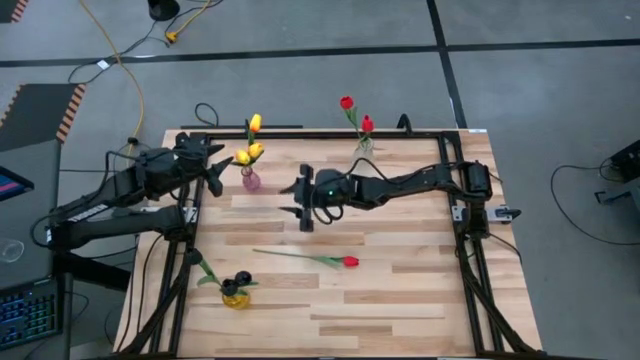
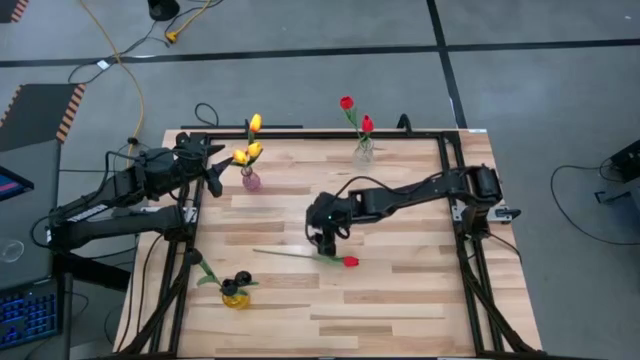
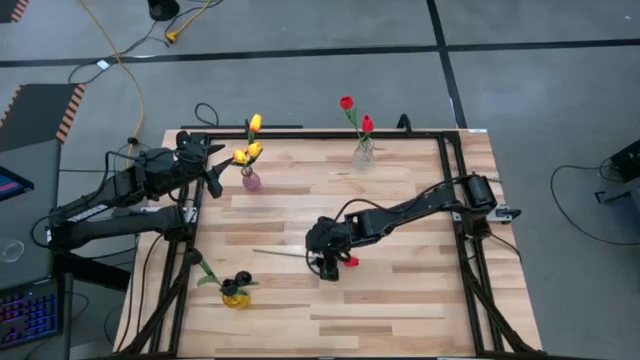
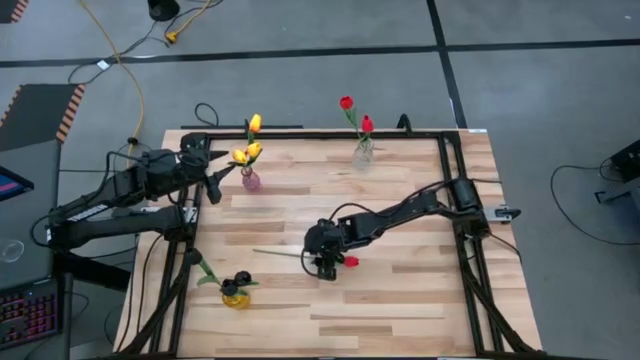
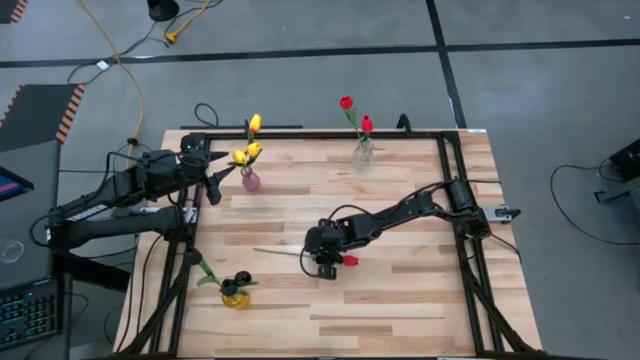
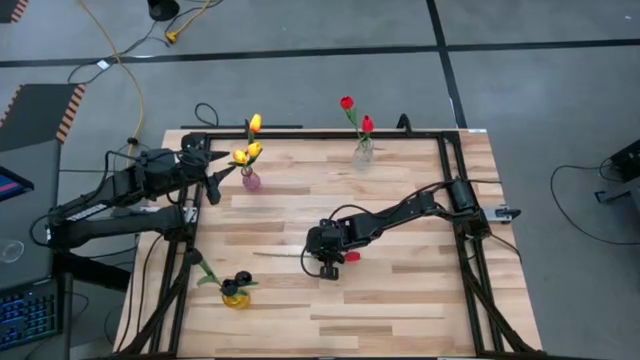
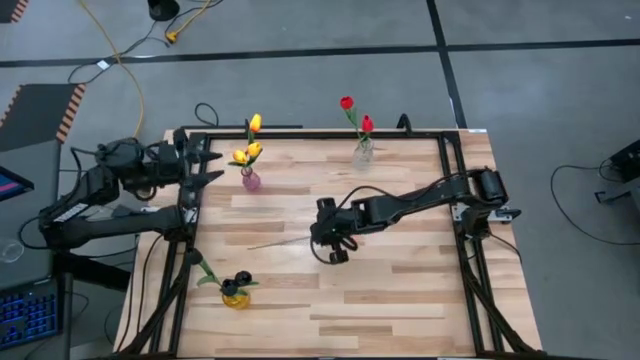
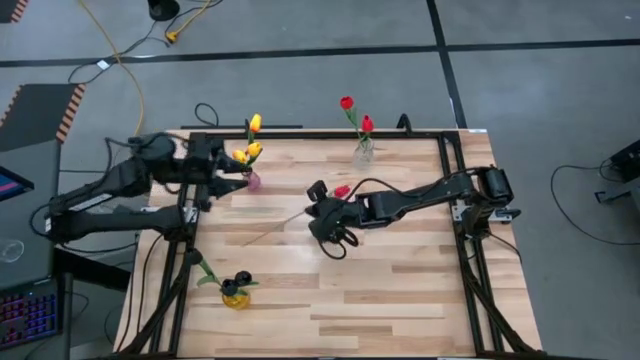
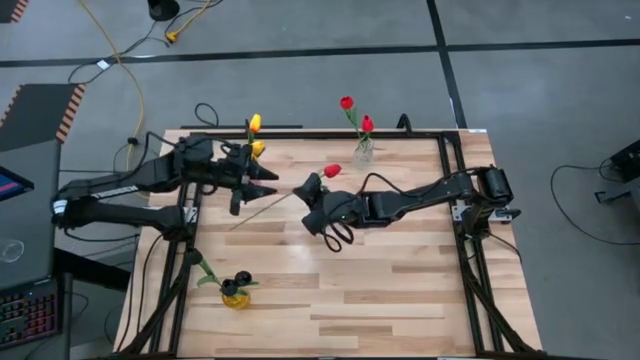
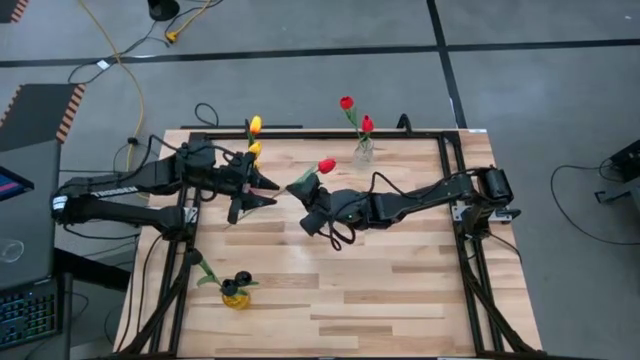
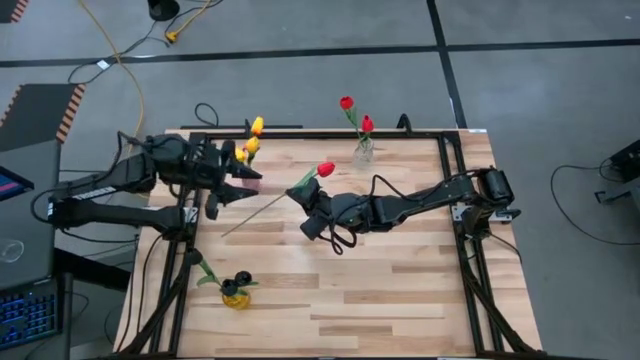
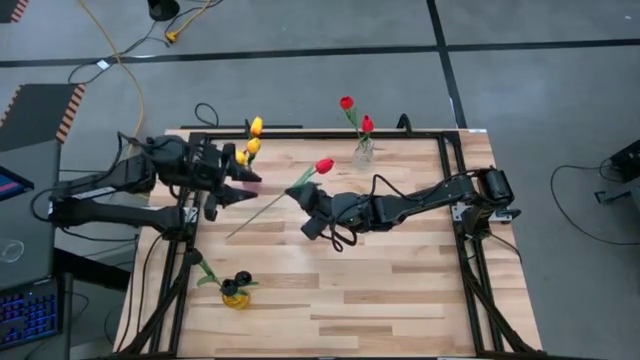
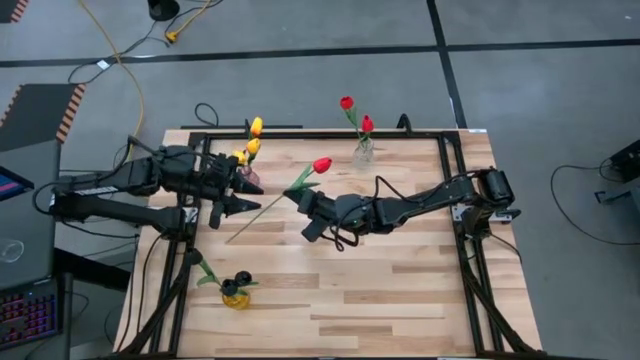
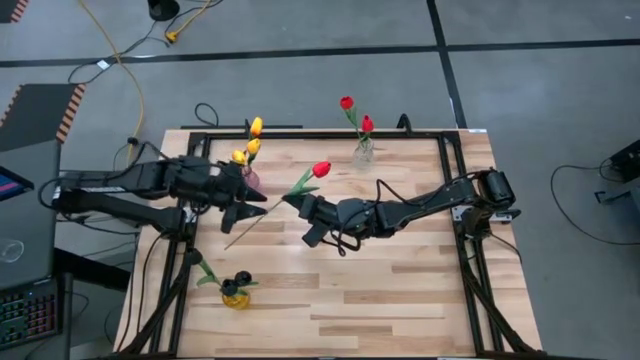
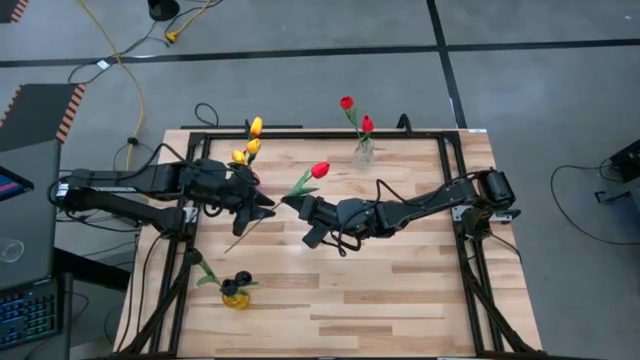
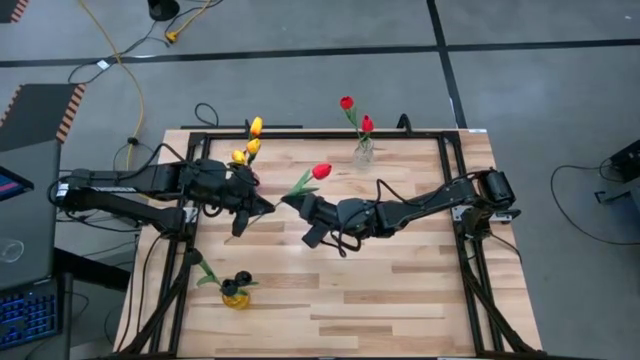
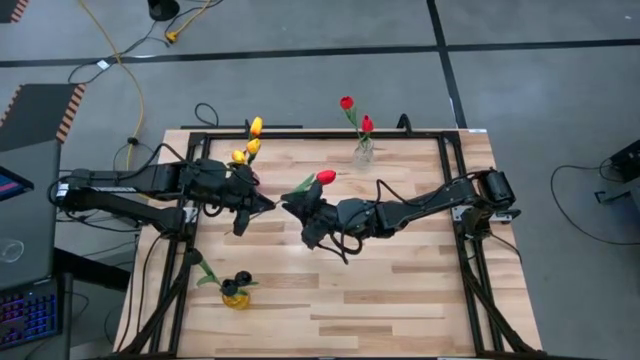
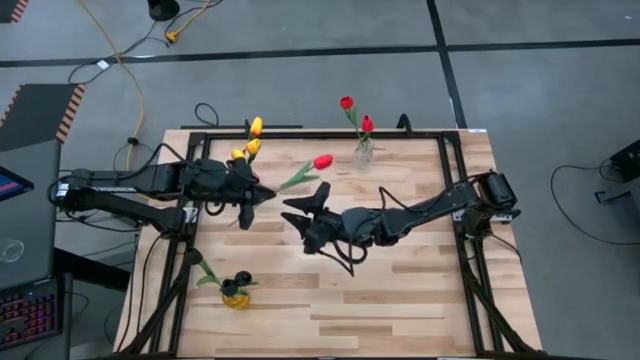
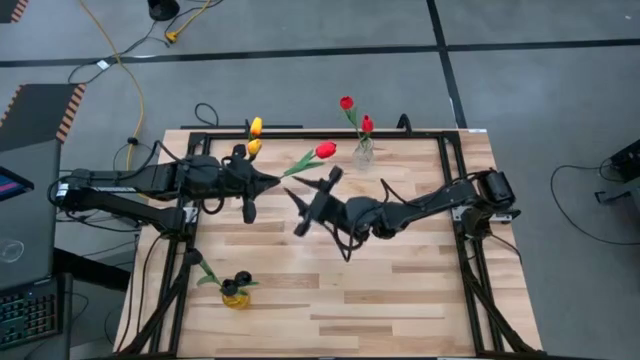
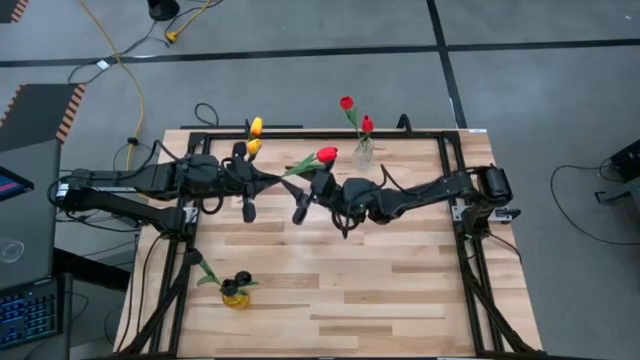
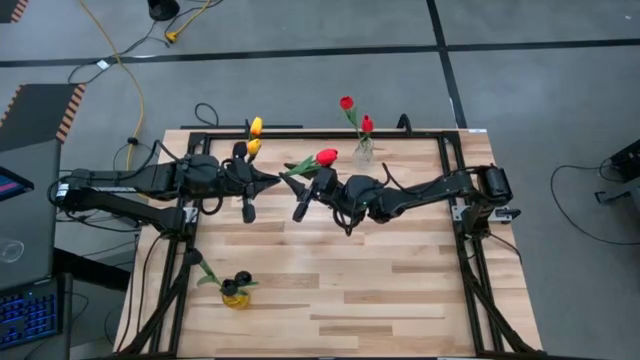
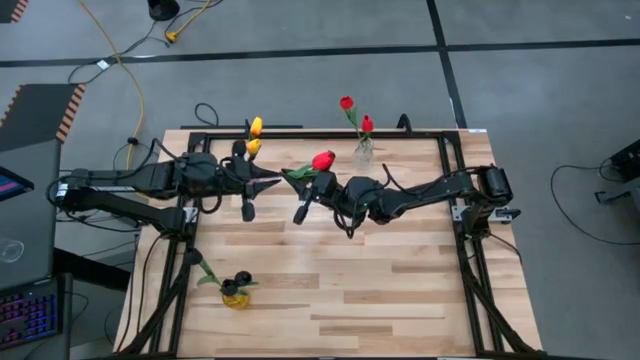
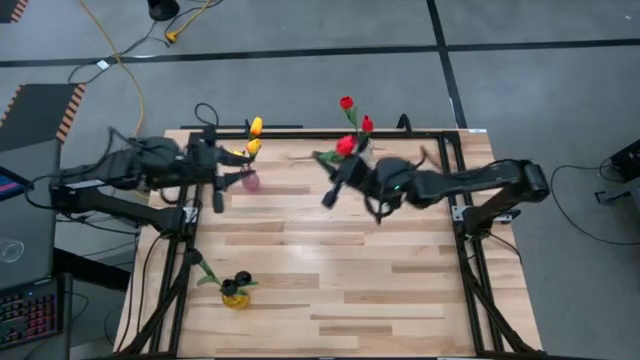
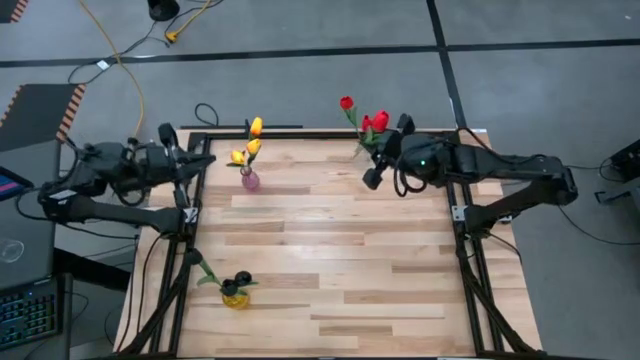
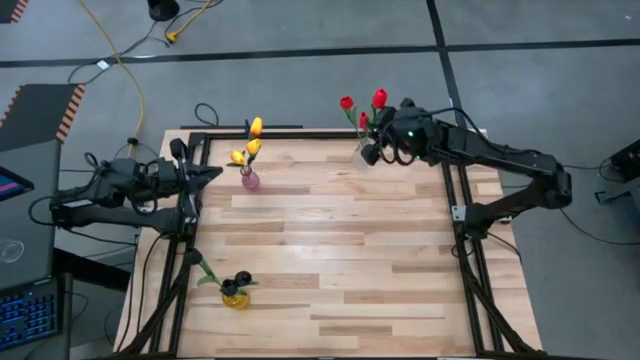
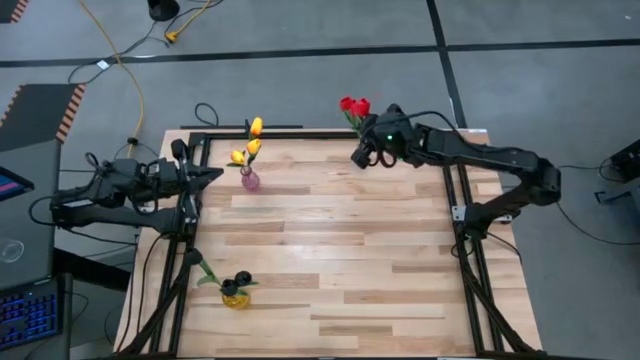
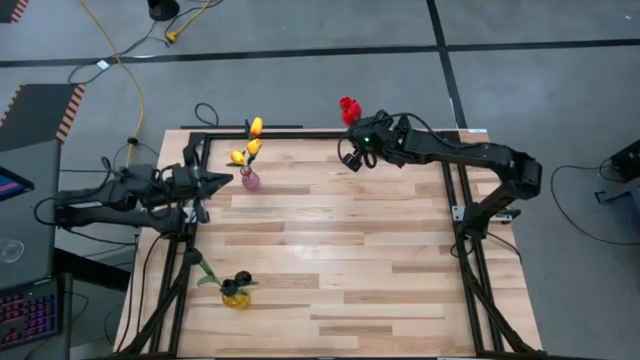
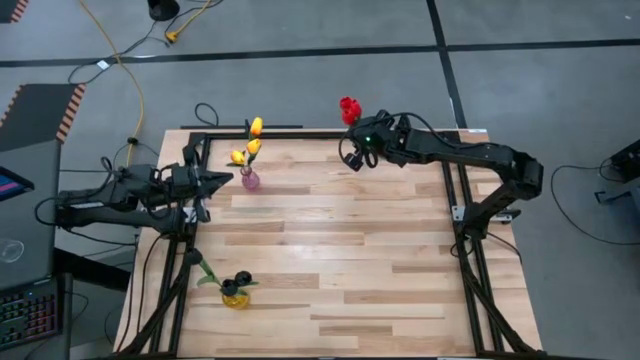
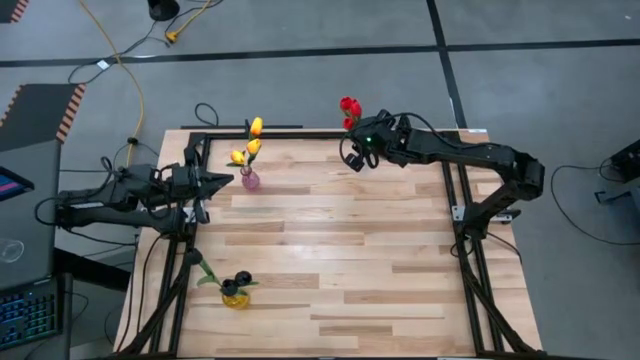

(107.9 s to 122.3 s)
Task: Sort flowers into vase by color
Put the red tulip into the transparent vase

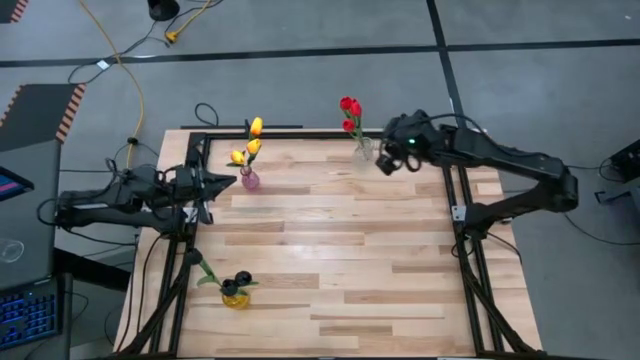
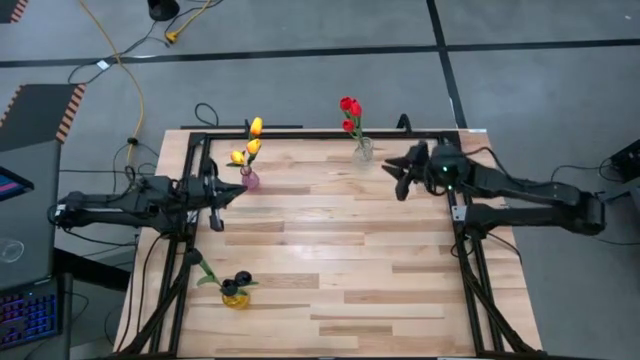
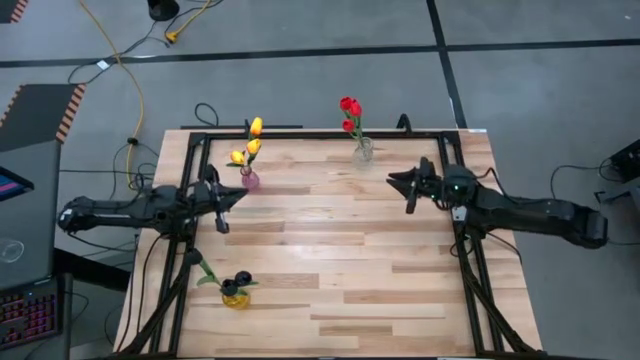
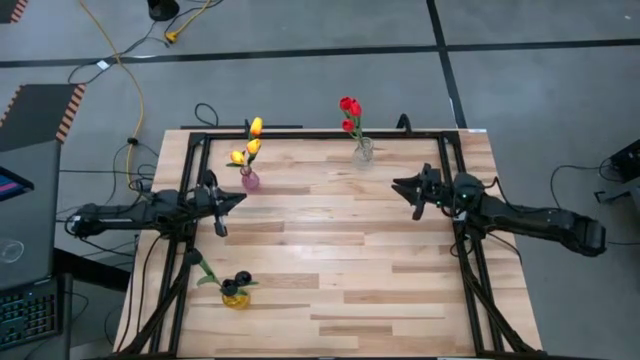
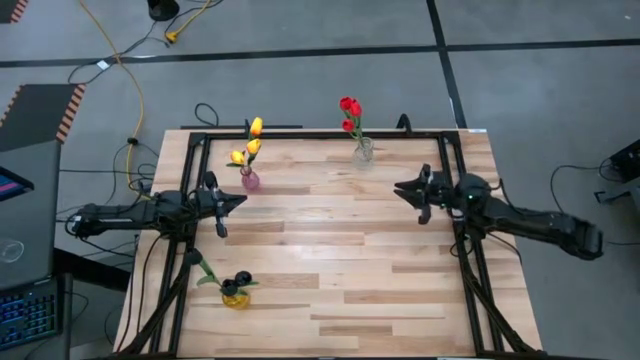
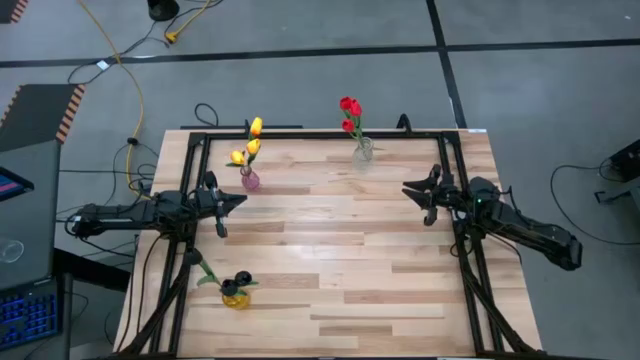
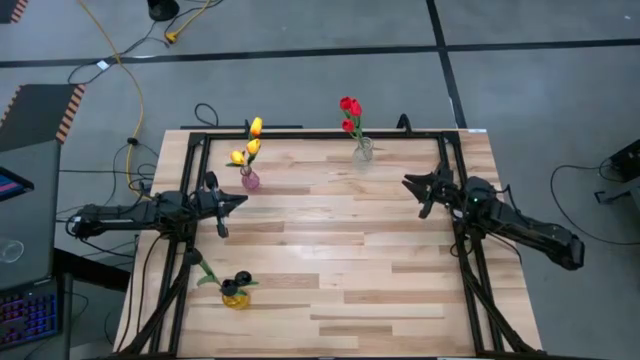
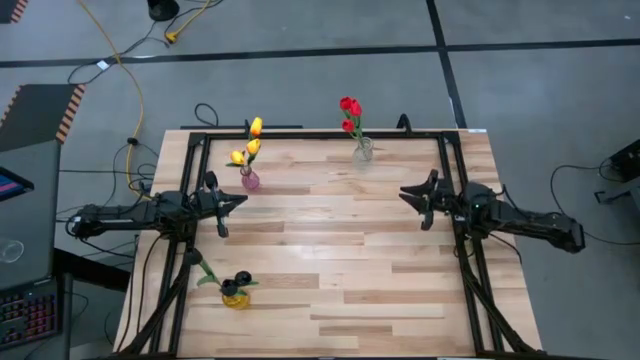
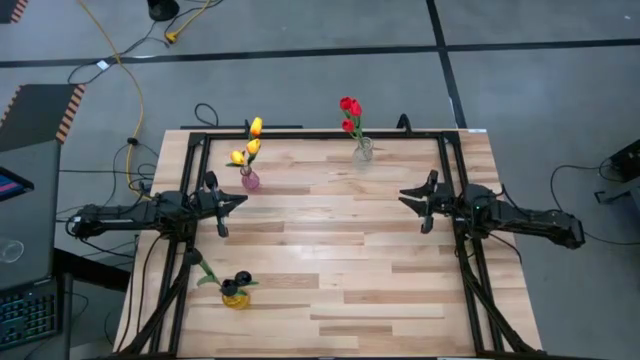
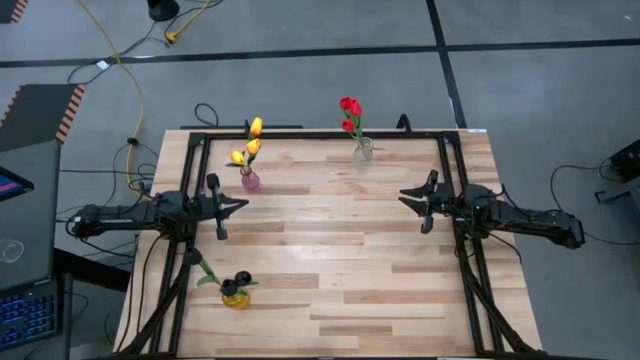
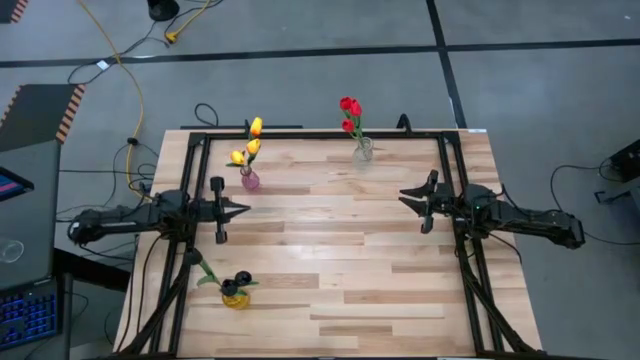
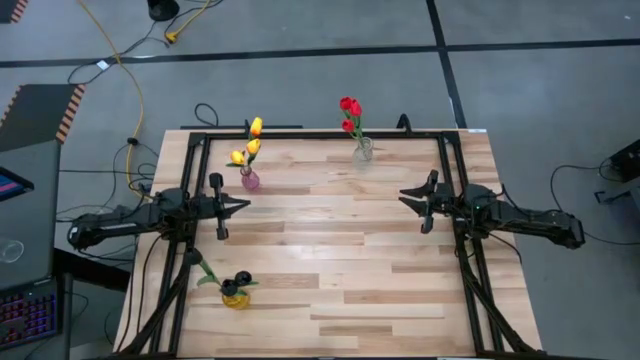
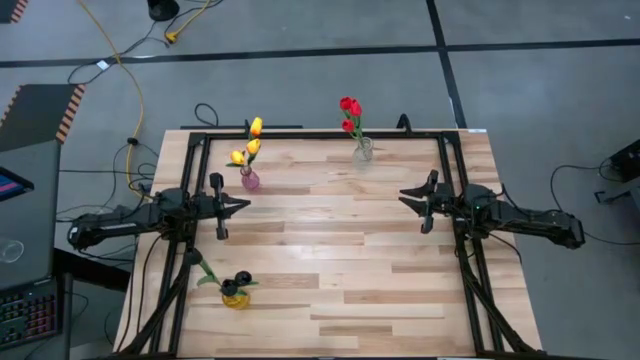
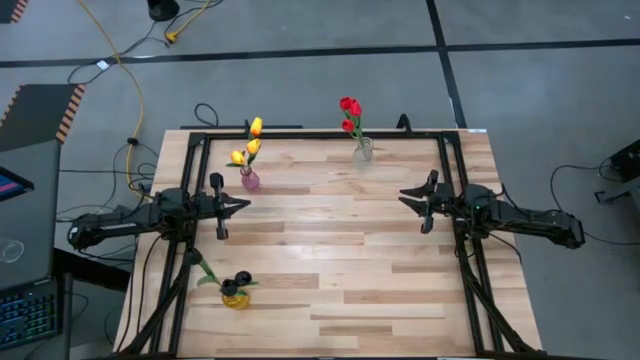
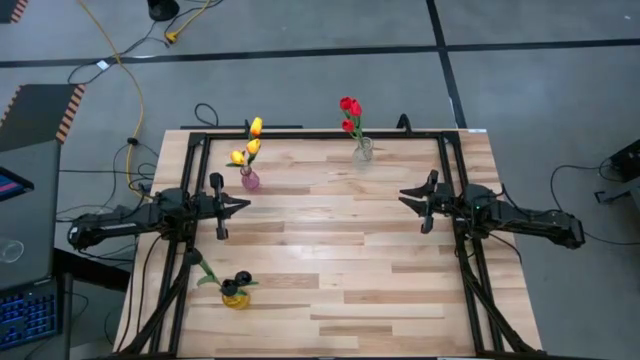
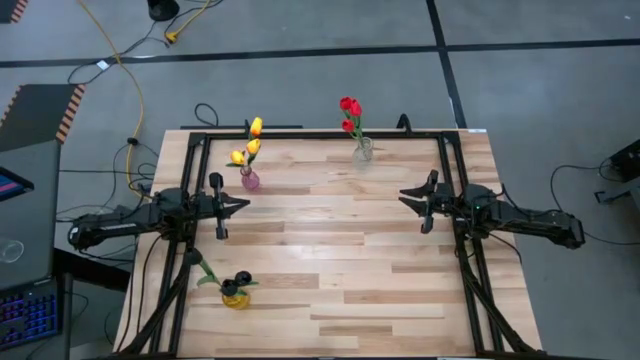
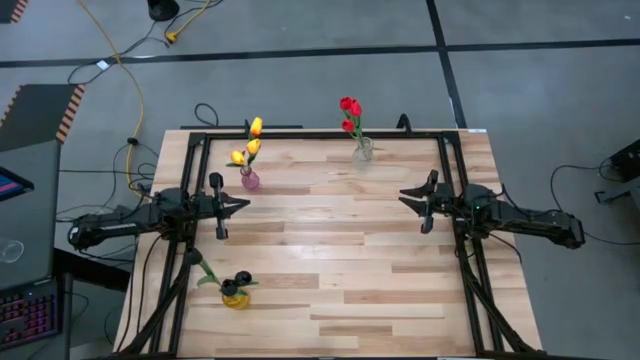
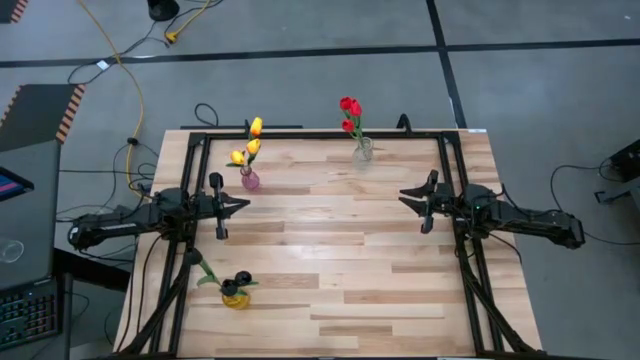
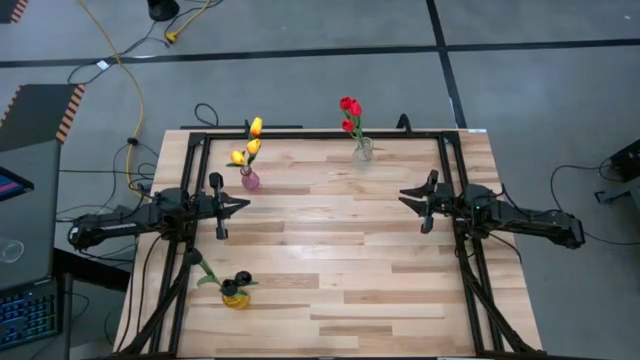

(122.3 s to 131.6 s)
Return to Home Position
